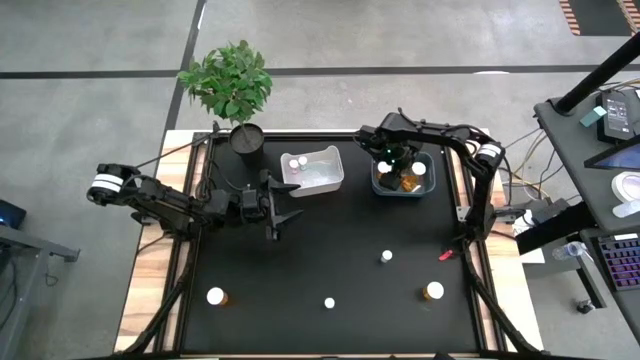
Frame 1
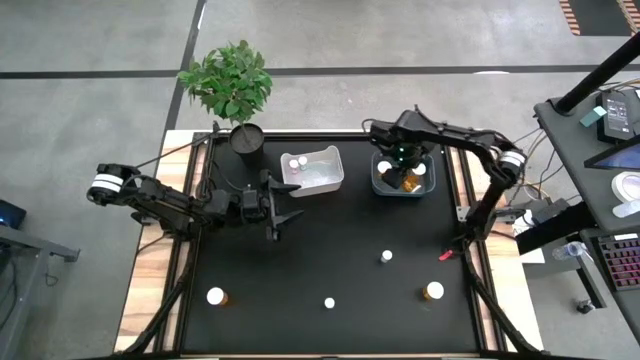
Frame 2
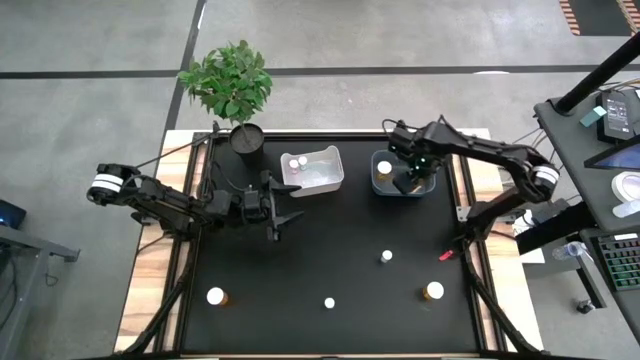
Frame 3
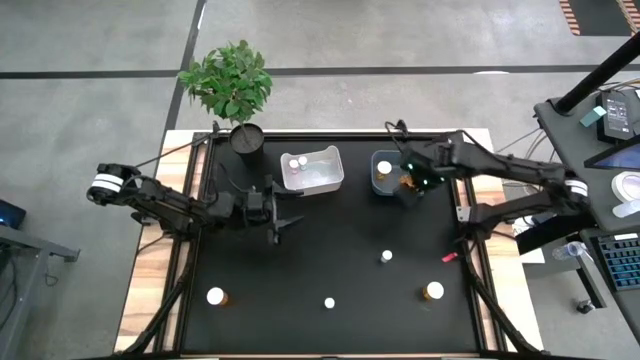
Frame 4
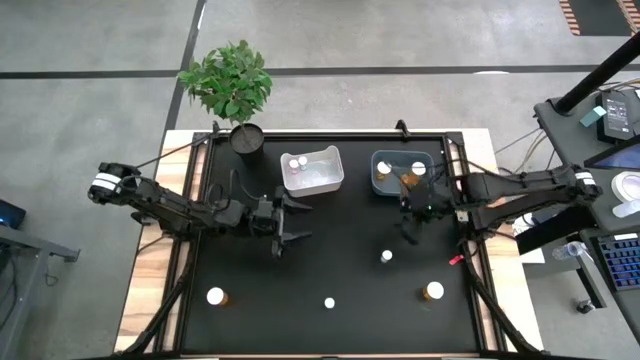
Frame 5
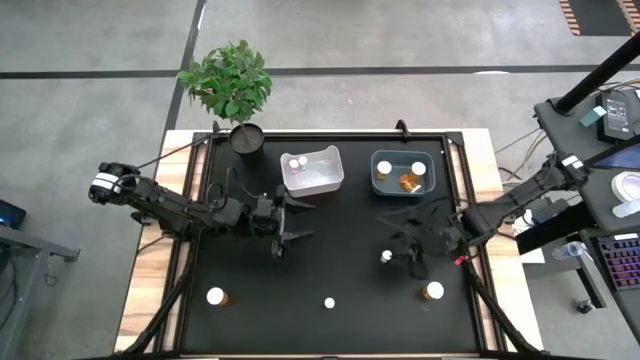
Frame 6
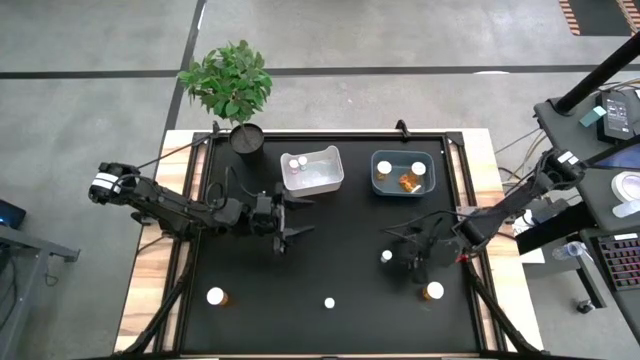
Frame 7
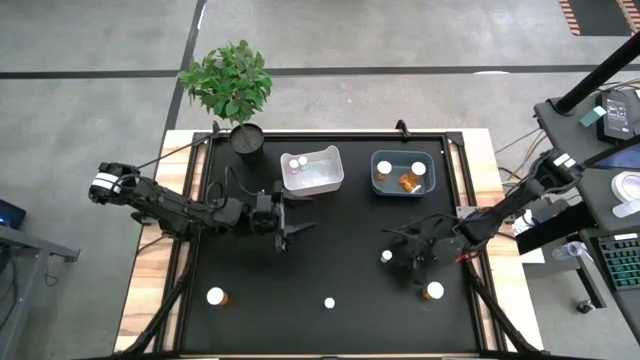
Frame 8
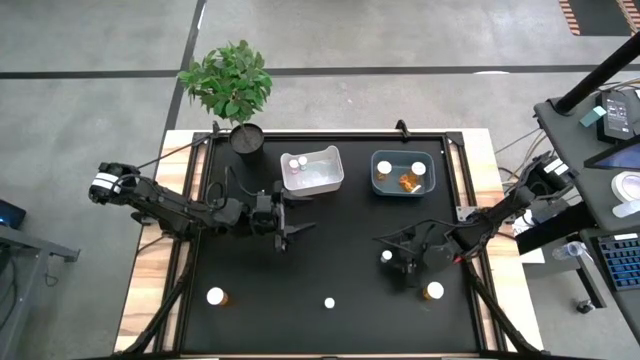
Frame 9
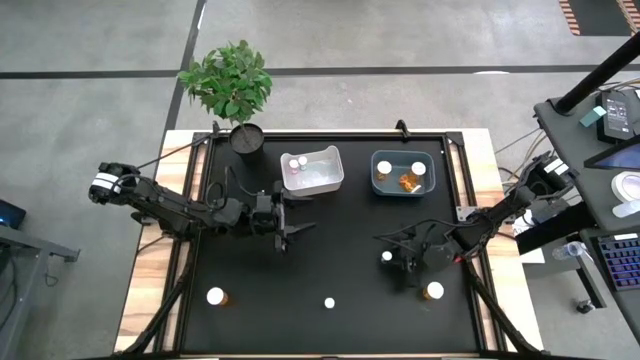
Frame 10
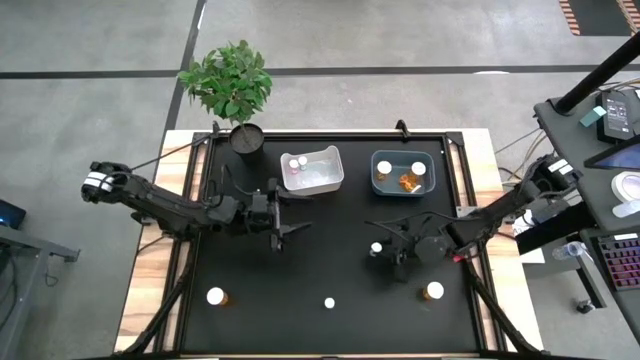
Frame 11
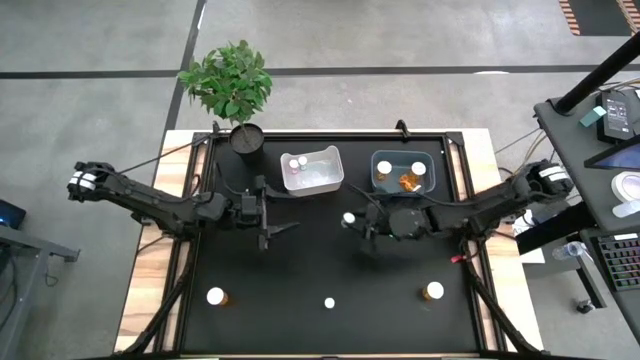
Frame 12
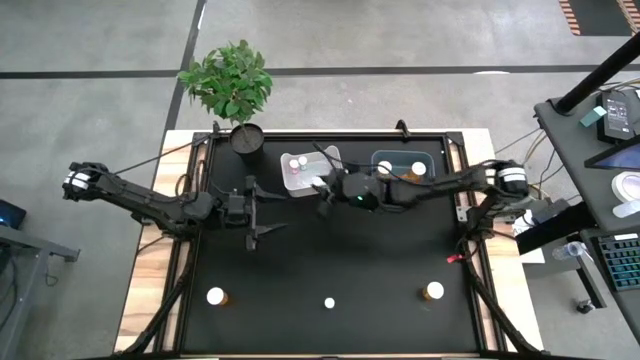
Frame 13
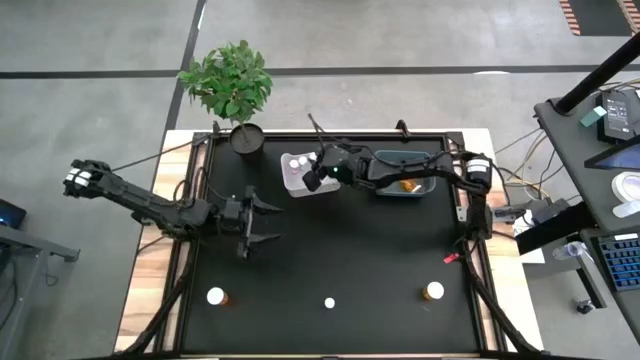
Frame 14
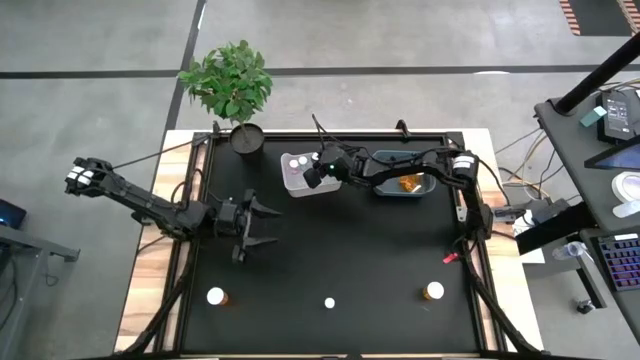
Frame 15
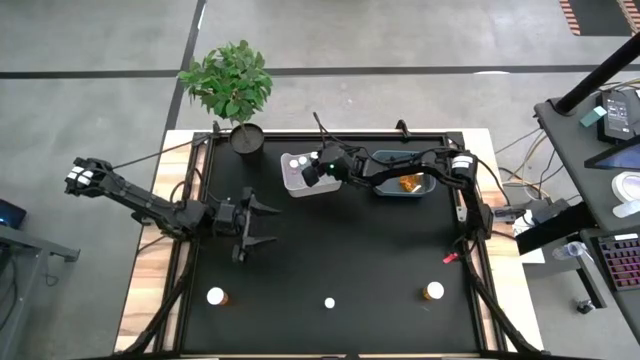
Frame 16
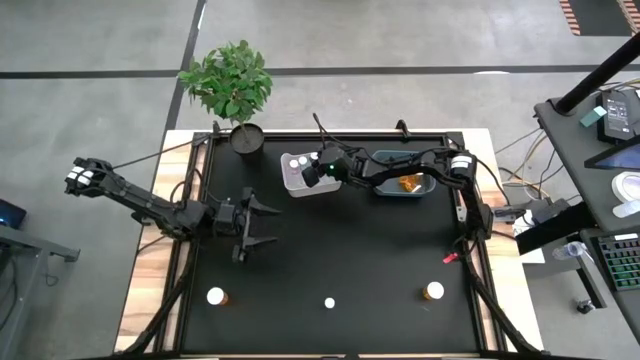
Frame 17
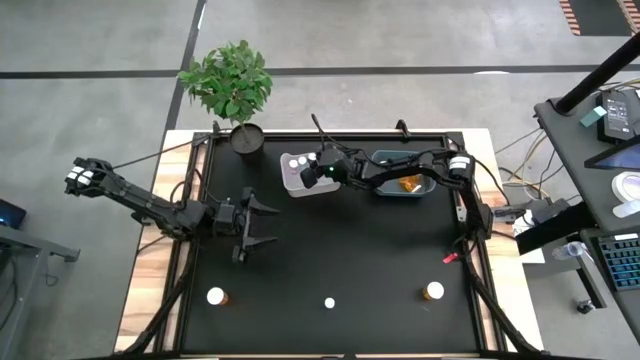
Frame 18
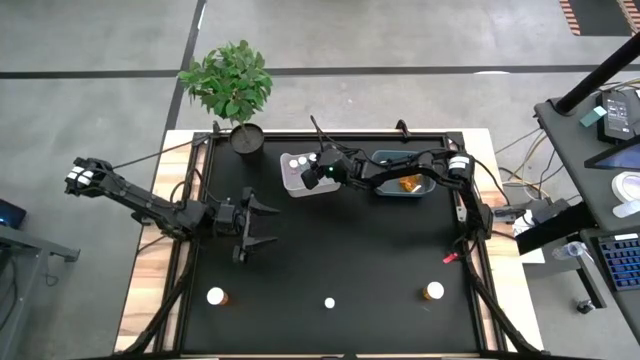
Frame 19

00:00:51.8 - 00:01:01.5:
Task: Pick and place medicine bottles into bin by pill shape (circle, oval)
Put the blue tablet bottle into the white bin

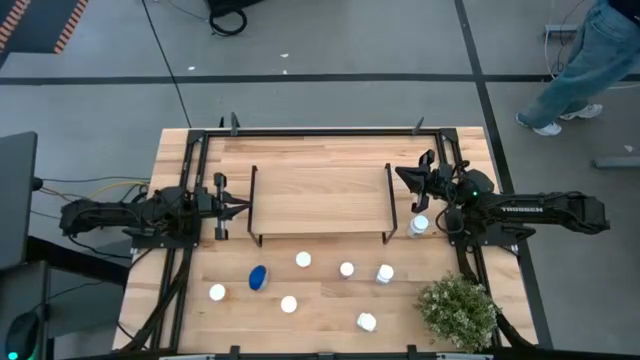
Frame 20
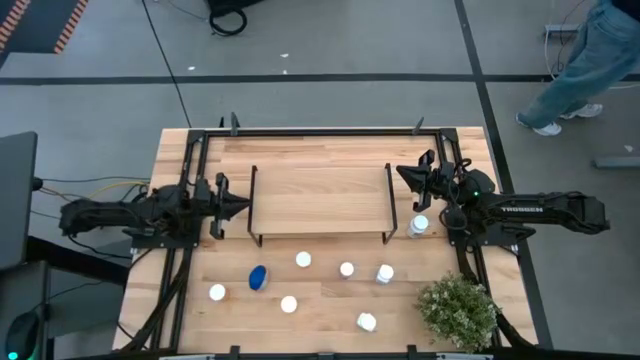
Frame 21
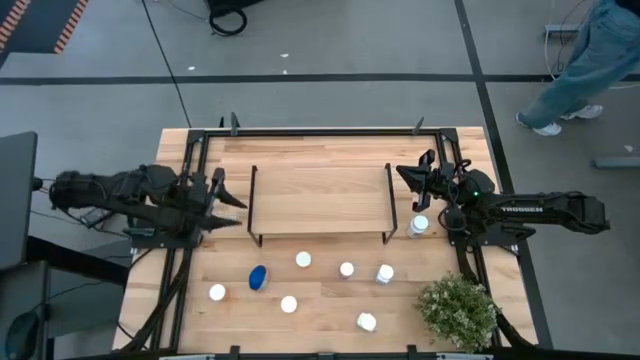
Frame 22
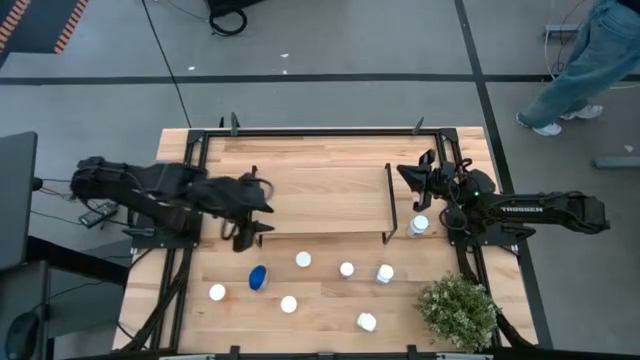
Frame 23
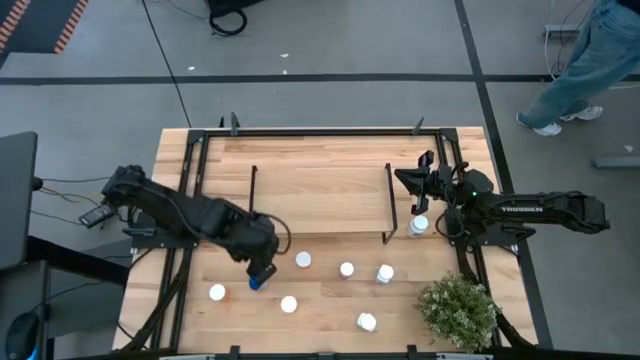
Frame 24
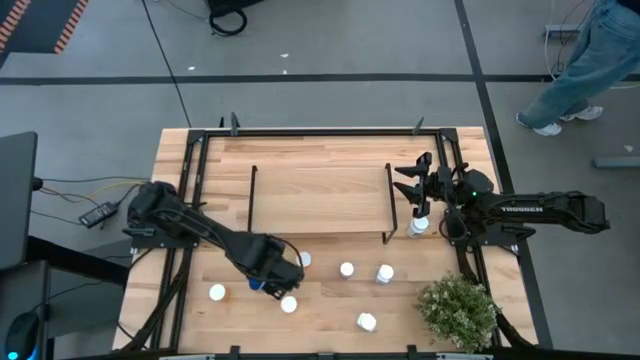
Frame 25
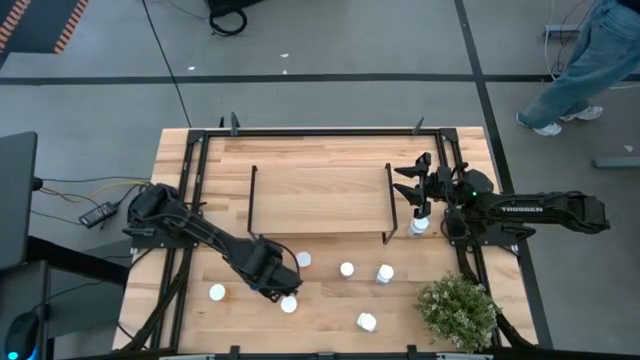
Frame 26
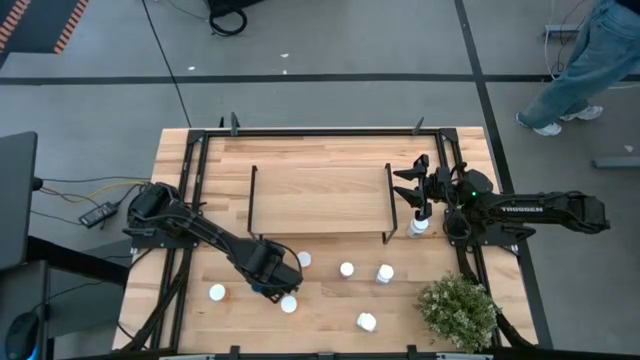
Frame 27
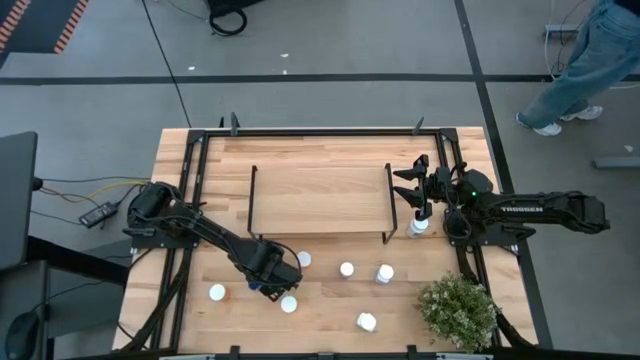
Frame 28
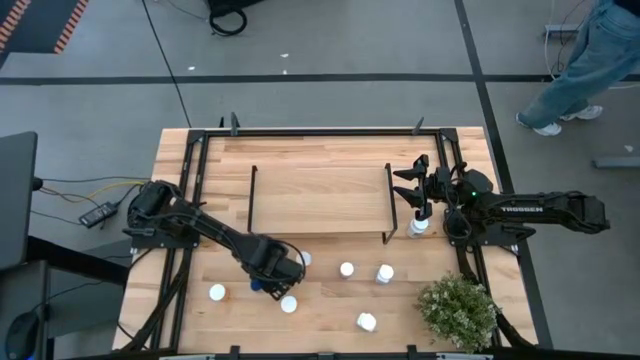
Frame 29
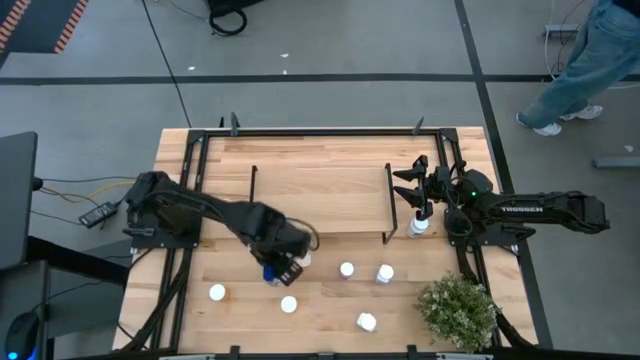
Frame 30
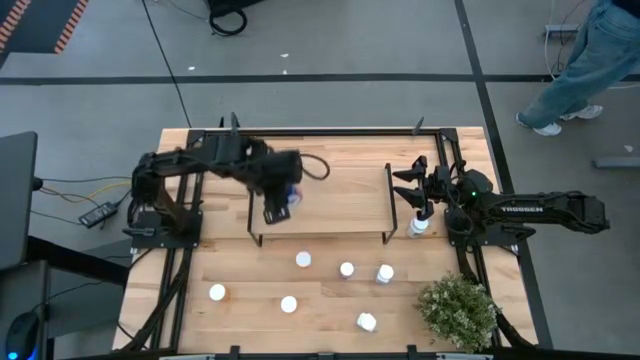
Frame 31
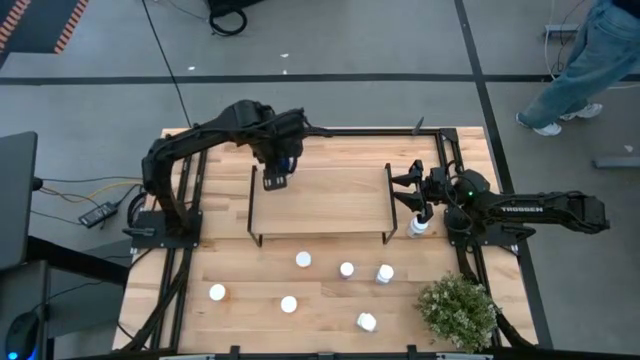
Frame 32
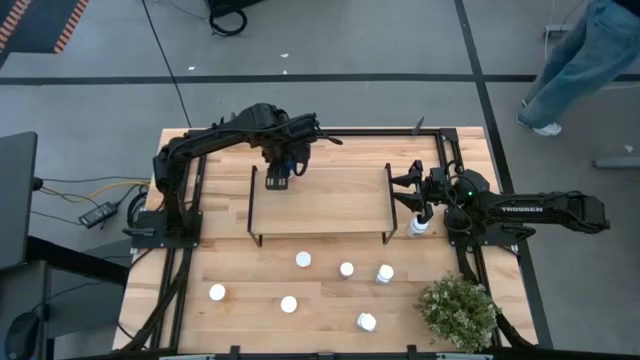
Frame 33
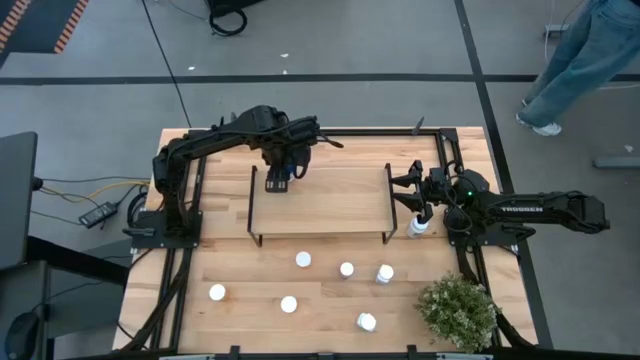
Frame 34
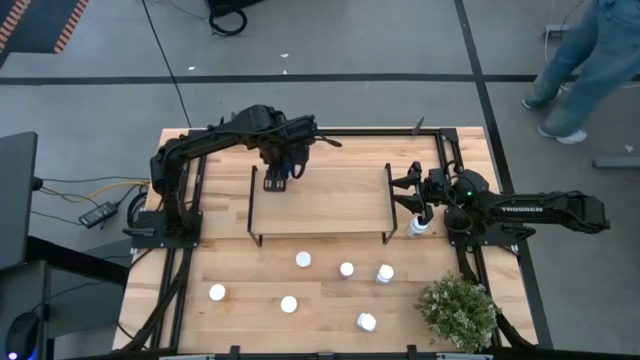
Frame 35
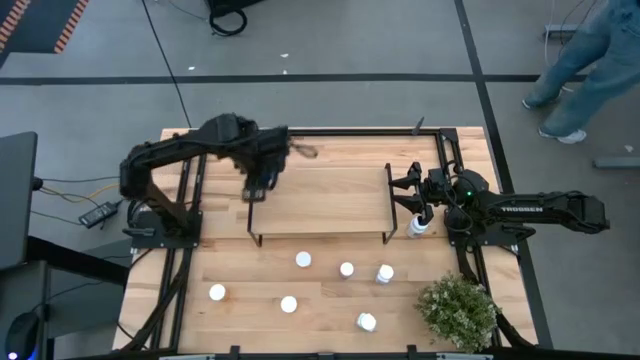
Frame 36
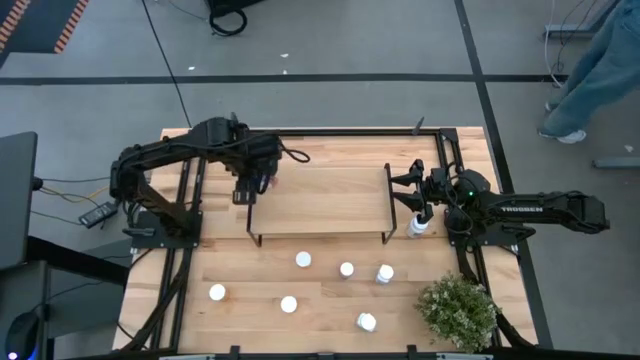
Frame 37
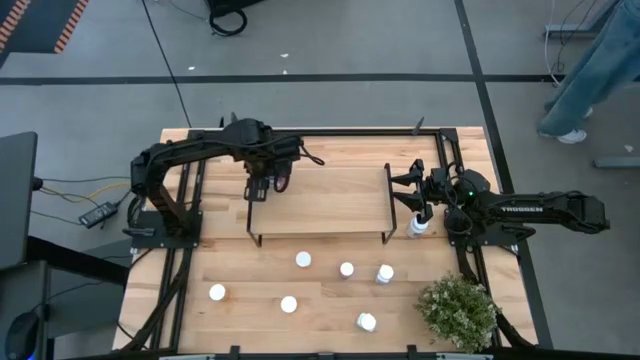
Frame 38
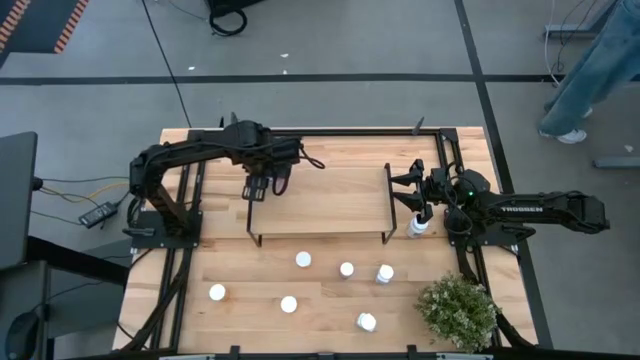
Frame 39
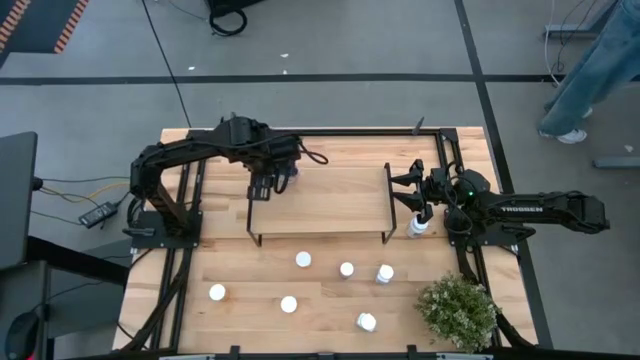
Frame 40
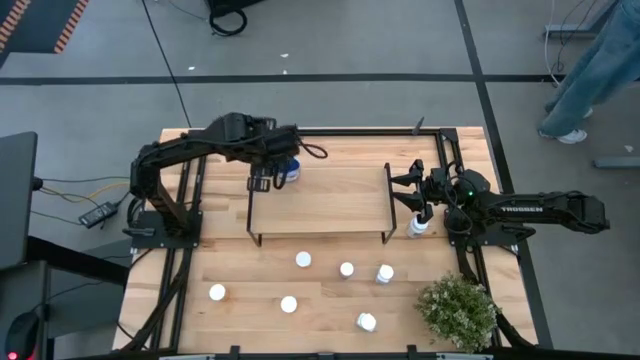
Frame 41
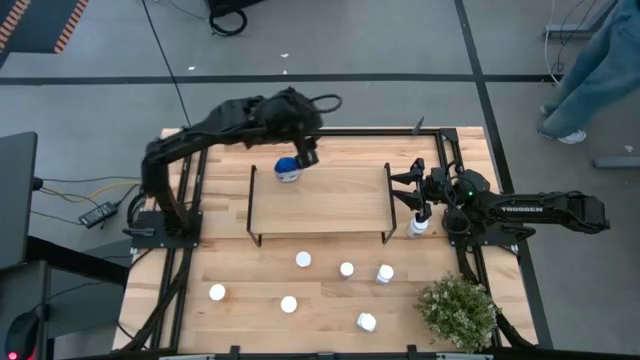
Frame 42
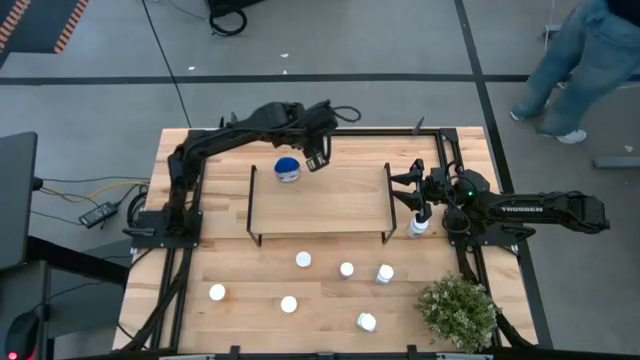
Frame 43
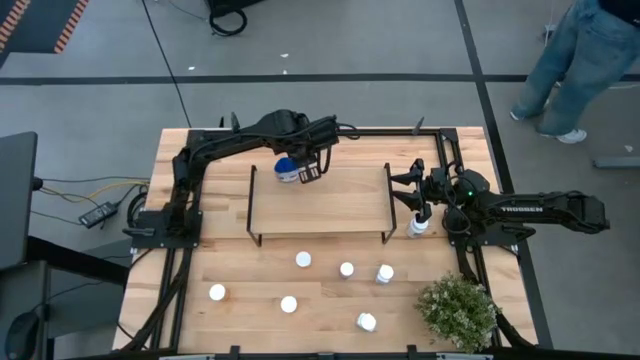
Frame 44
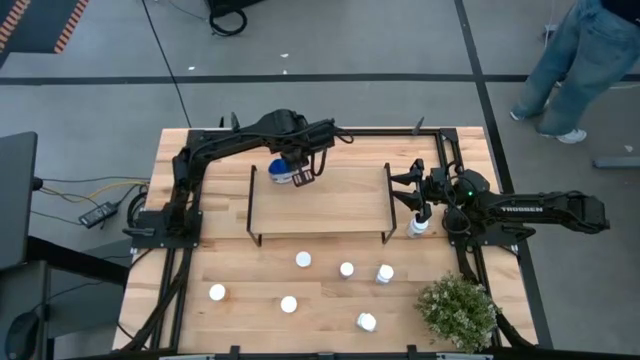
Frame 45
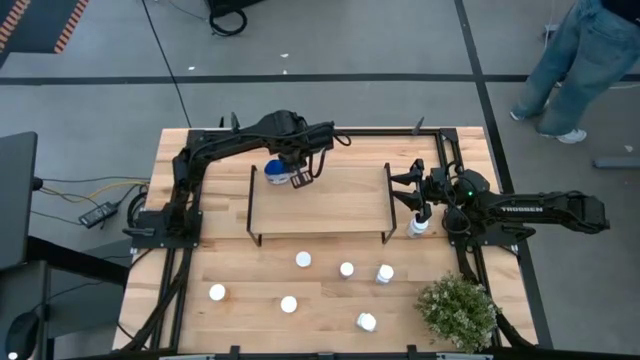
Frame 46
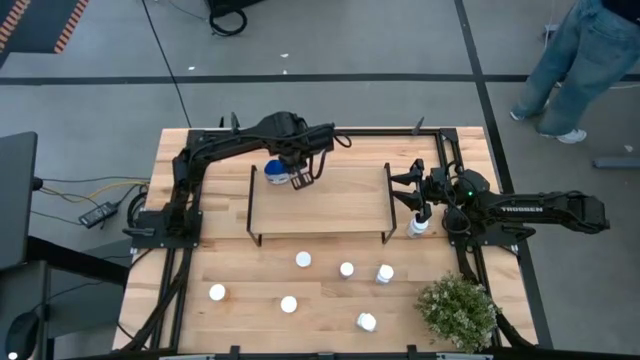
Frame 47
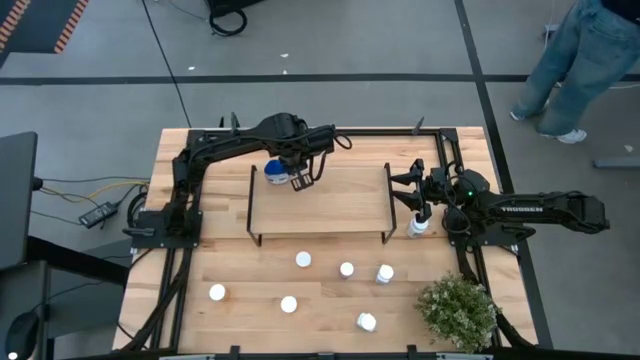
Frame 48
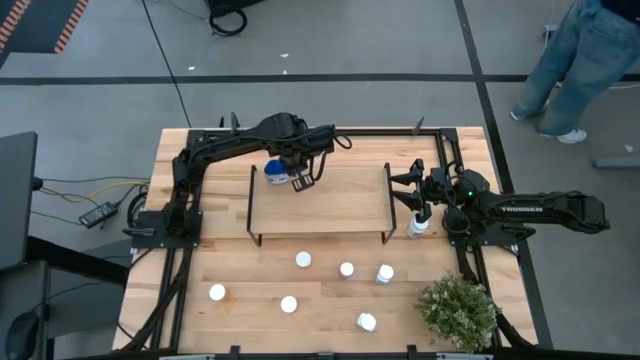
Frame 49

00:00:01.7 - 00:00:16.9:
Task: Pick and place medicine bottles onto shelf by color
Put the blue medicine bottle on the shelf
